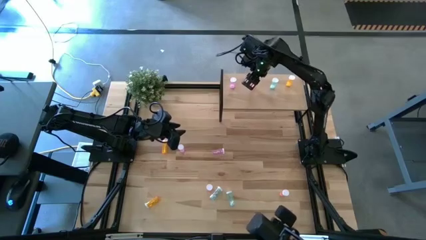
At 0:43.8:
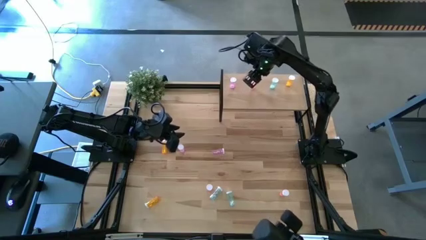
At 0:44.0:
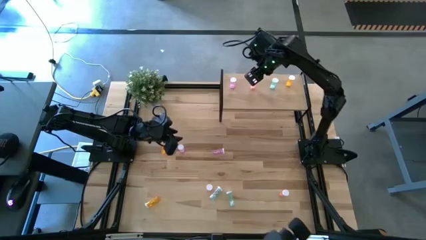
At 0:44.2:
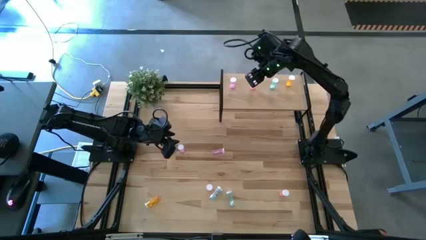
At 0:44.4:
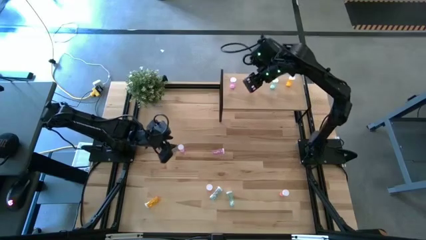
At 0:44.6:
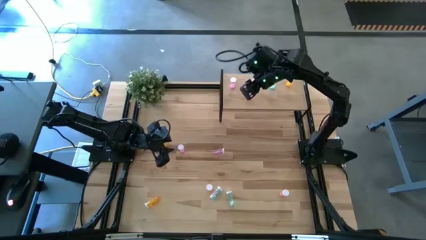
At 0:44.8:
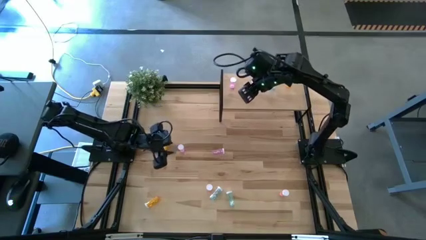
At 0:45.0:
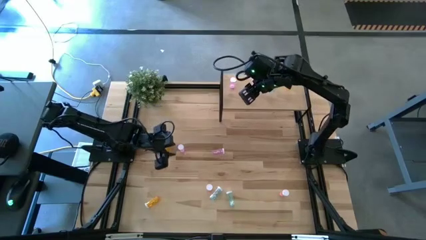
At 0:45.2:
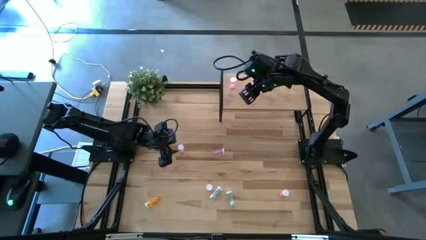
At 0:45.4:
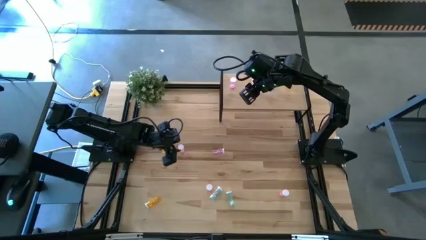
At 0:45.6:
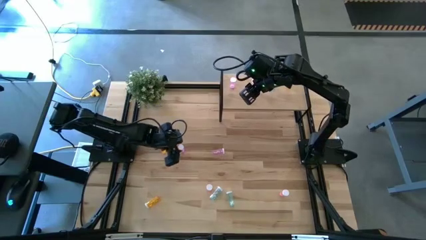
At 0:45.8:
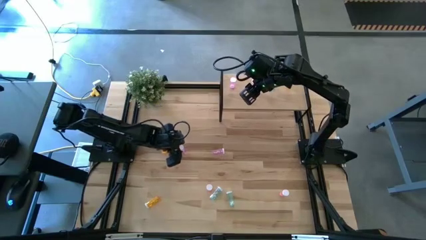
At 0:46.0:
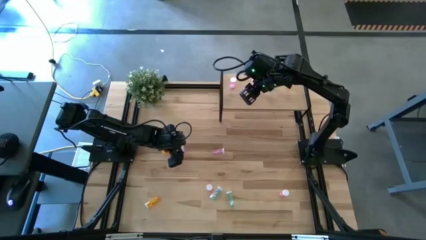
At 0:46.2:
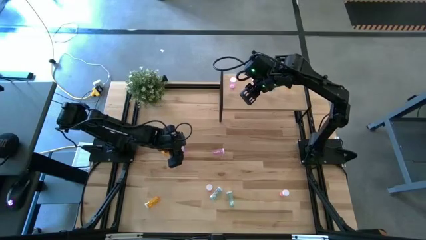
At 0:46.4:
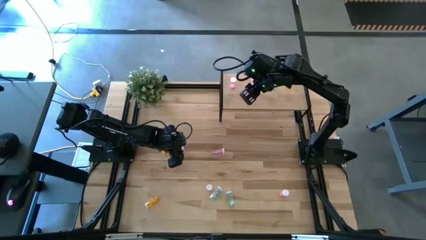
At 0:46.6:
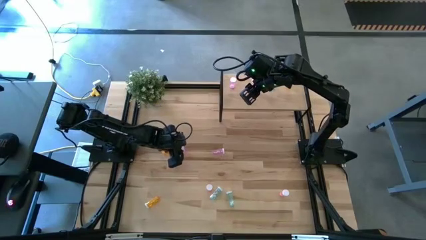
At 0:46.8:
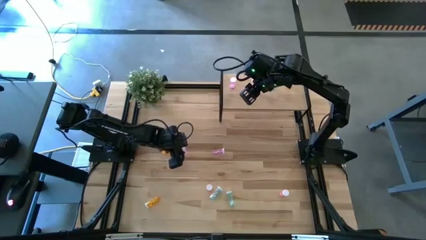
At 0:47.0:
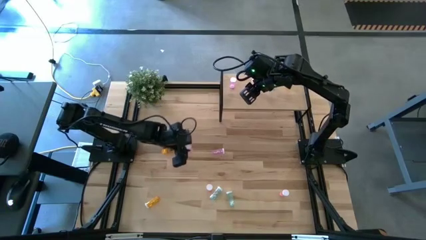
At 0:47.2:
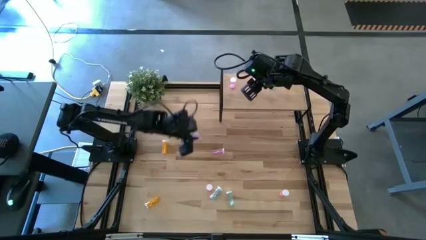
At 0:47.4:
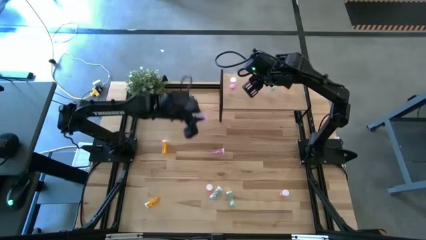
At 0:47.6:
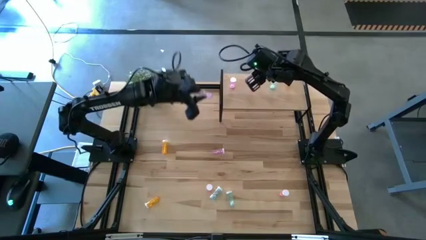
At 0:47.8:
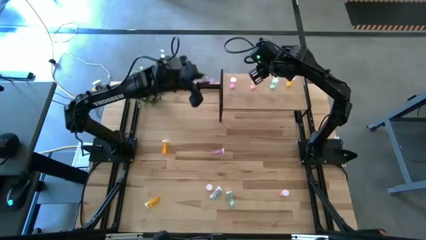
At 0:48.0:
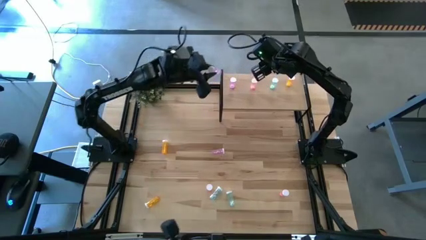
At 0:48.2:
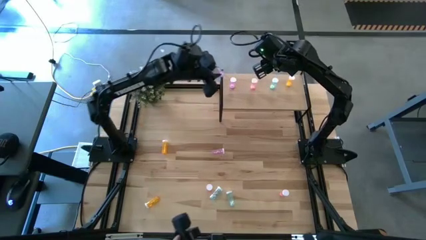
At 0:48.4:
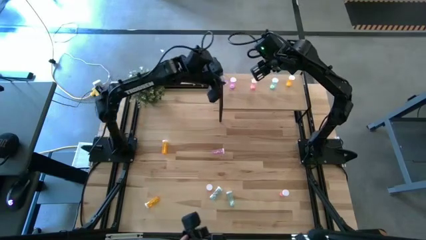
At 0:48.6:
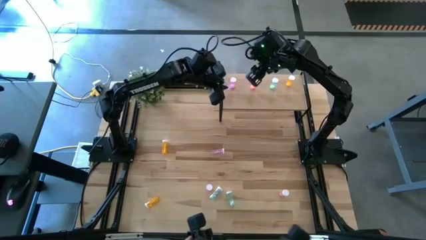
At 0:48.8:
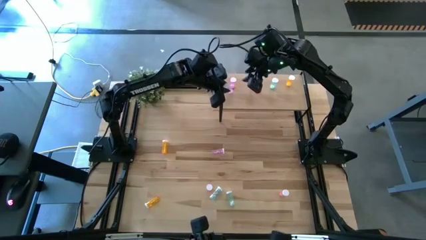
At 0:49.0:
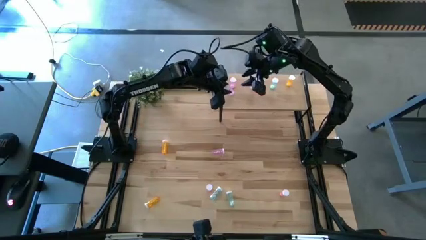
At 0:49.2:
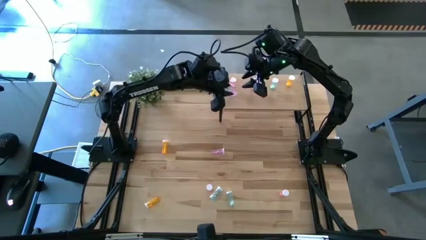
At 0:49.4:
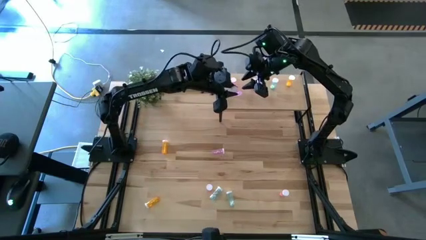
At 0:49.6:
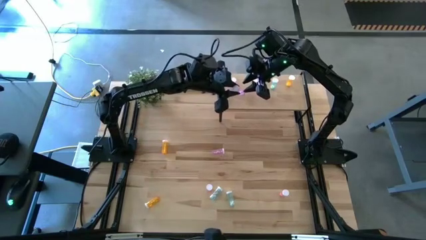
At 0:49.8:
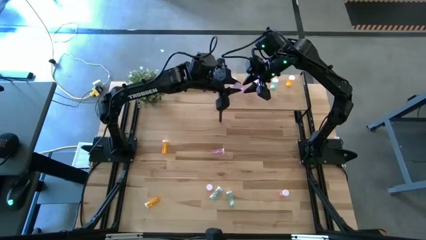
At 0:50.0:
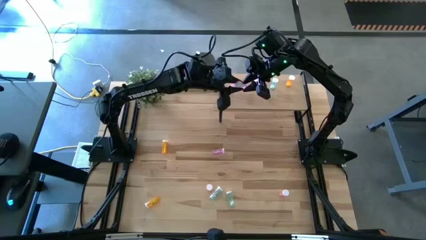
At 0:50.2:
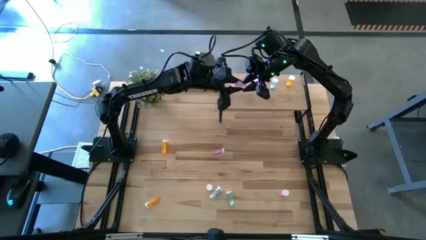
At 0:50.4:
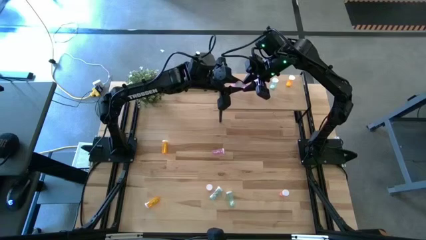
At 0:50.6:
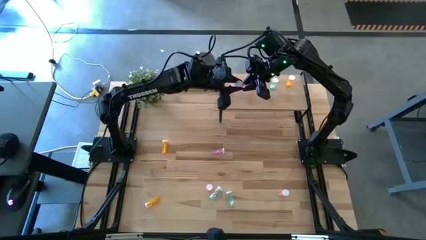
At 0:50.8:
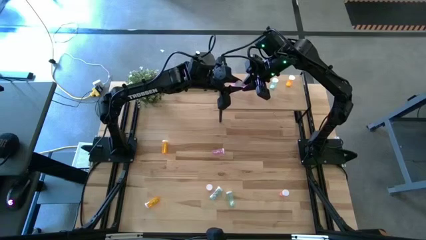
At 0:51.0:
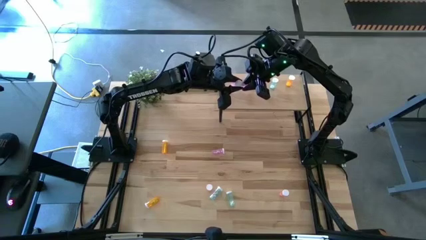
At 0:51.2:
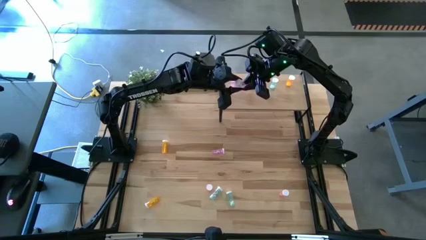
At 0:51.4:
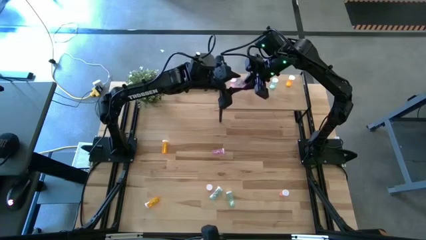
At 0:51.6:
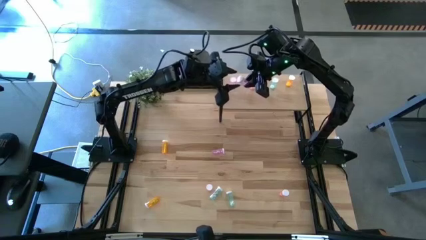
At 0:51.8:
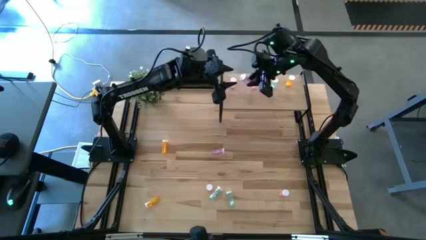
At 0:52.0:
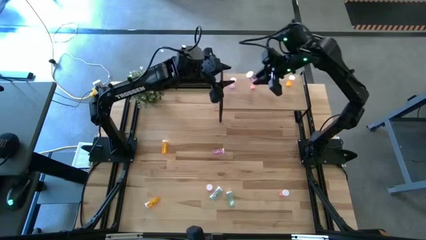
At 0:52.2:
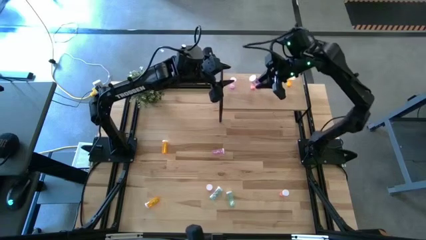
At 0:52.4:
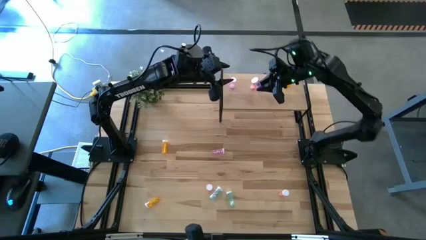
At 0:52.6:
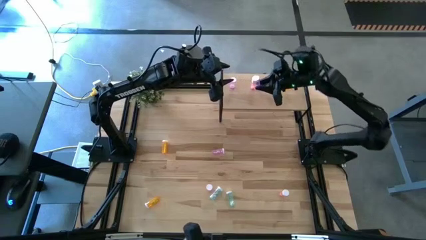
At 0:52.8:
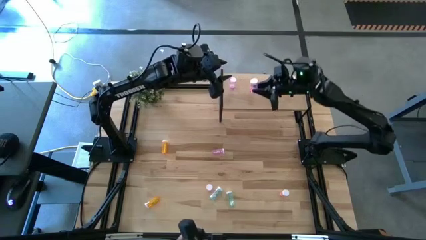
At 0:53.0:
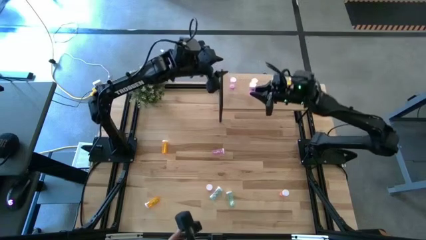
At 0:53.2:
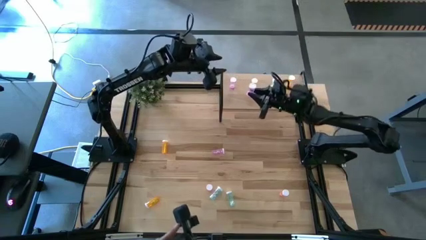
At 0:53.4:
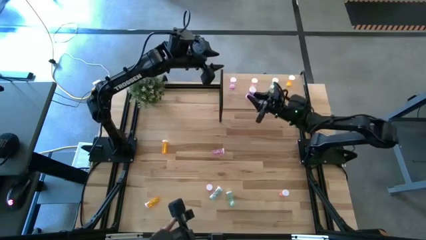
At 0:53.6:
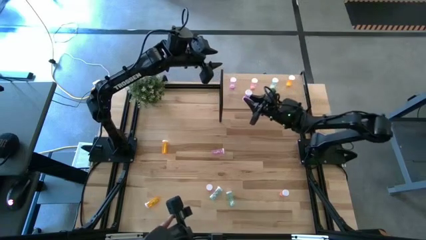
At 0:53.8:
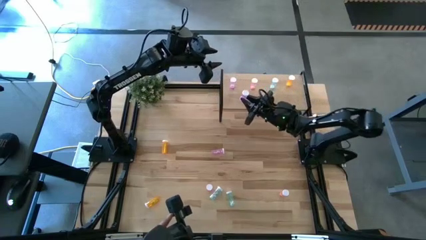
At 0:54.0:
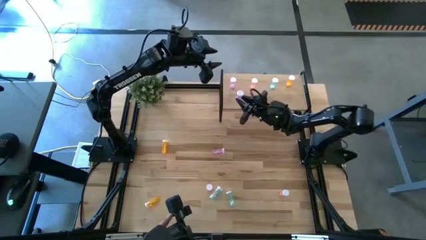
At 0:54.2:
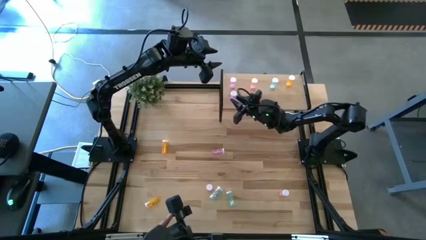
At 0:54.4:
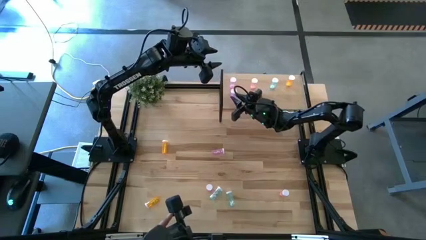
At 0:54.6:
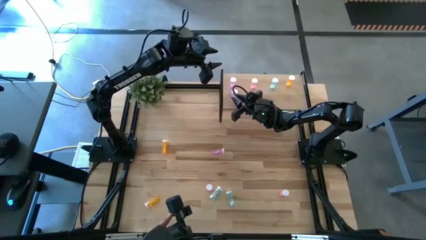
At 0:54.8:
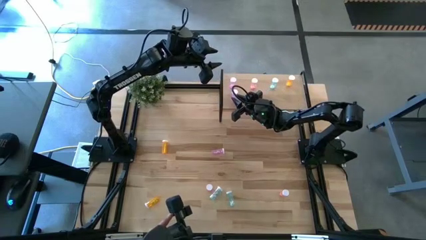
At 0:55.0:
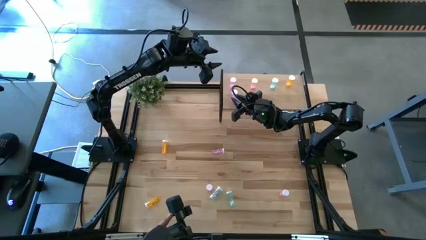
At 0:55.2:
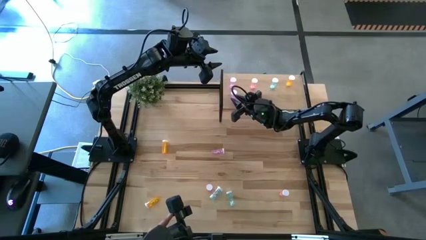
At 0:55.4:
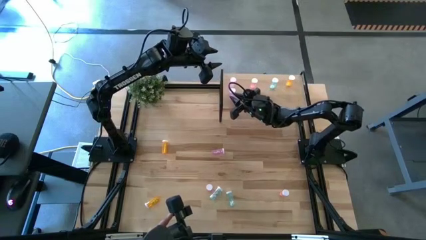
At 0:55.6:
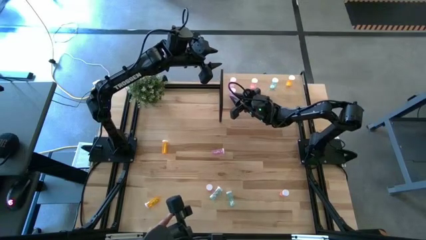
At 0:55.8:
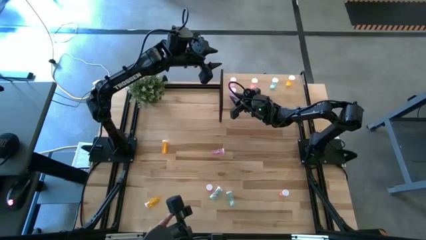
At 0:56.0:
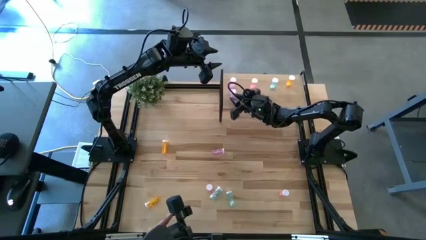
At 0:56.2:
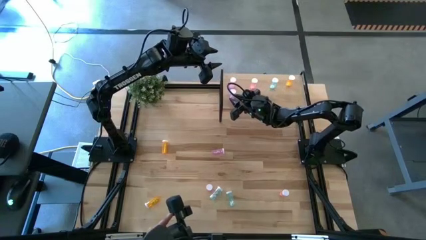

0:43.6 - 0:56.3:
Task: Pick and place medicine bottles onto shelf by color
Put the left pink pill bottle on the shelf aligned with the other pink pill bottle

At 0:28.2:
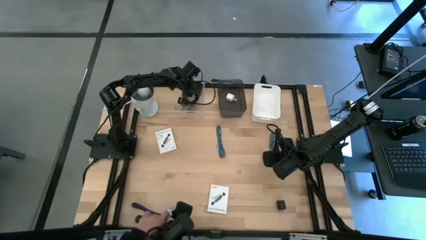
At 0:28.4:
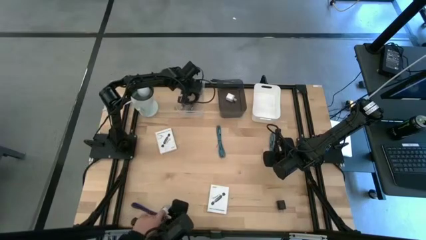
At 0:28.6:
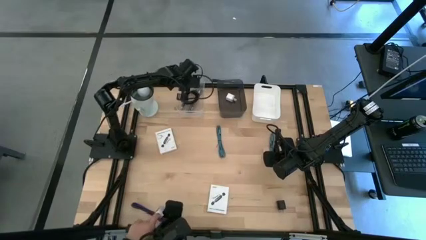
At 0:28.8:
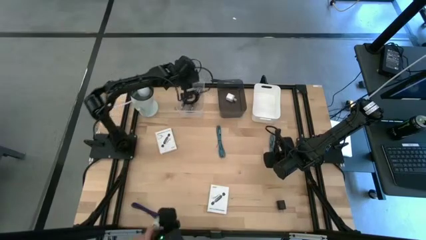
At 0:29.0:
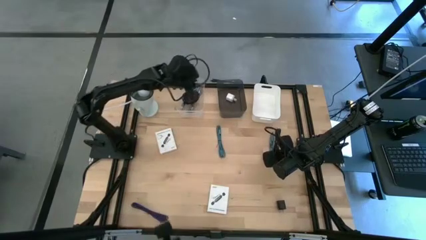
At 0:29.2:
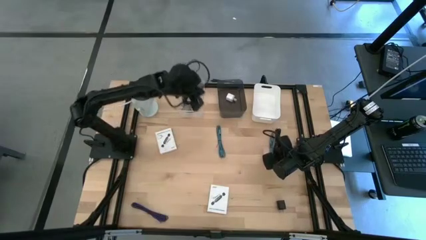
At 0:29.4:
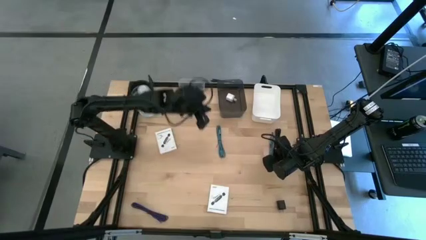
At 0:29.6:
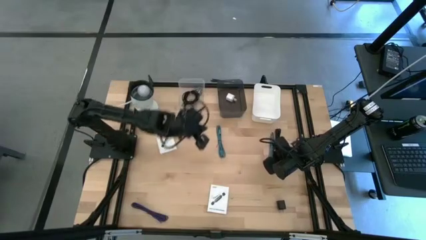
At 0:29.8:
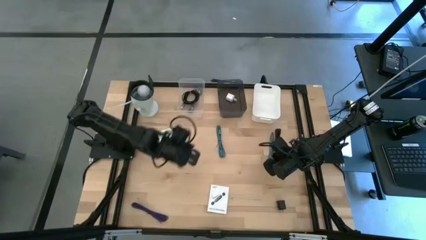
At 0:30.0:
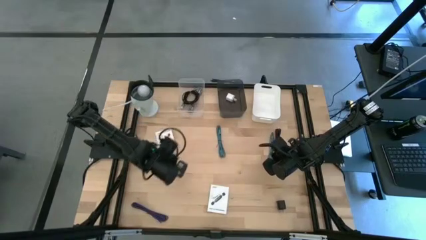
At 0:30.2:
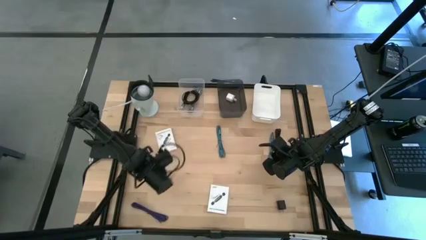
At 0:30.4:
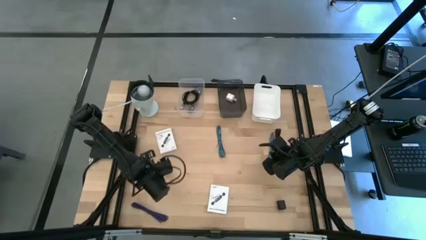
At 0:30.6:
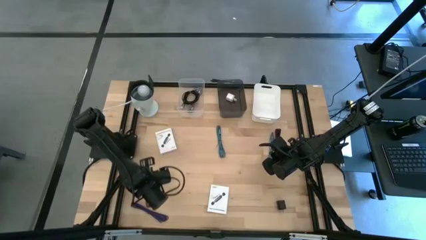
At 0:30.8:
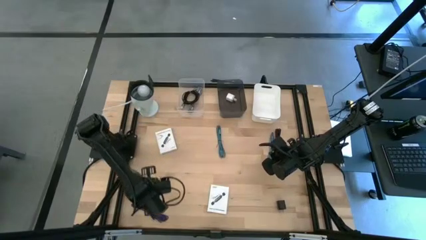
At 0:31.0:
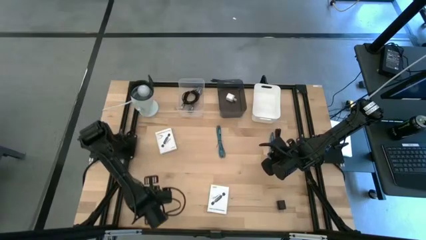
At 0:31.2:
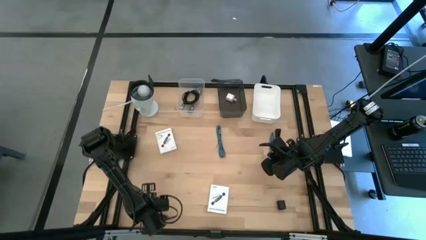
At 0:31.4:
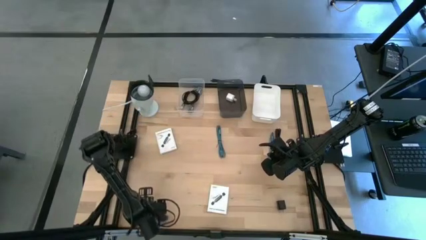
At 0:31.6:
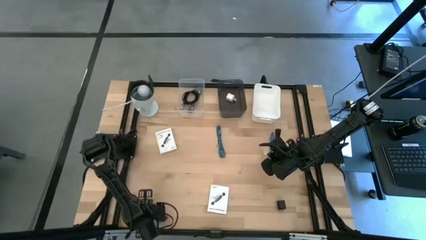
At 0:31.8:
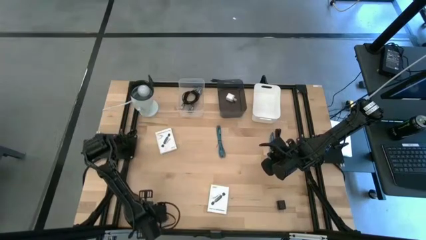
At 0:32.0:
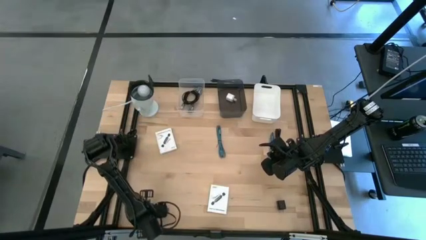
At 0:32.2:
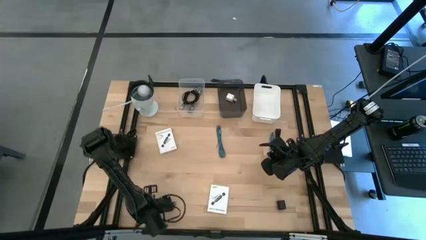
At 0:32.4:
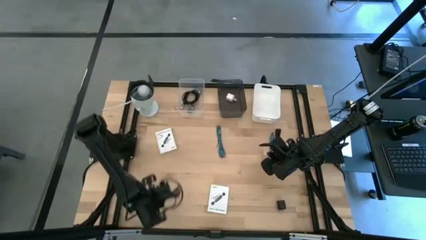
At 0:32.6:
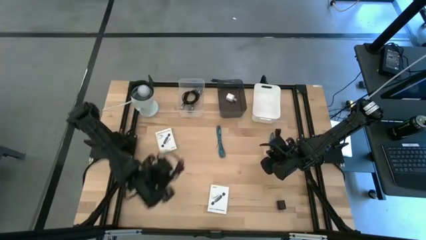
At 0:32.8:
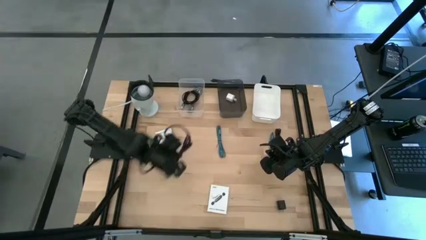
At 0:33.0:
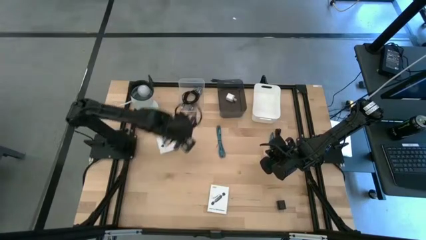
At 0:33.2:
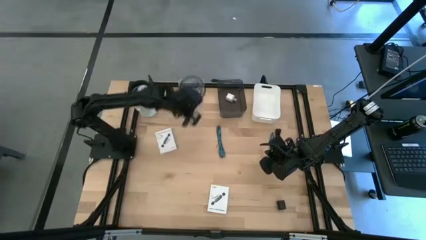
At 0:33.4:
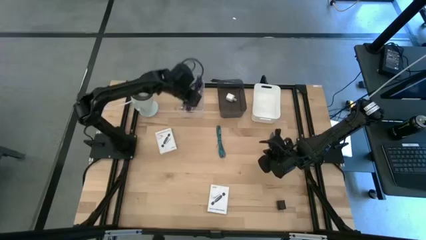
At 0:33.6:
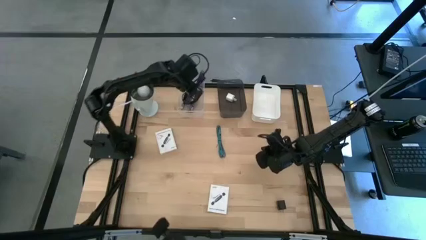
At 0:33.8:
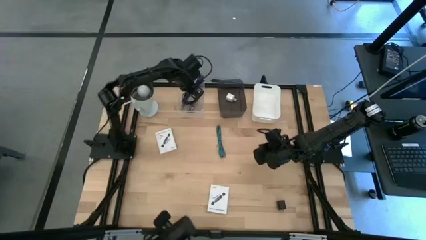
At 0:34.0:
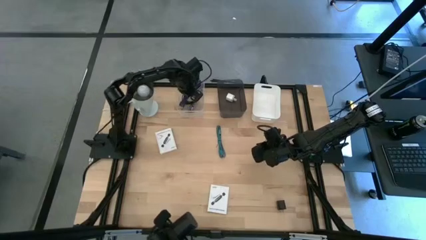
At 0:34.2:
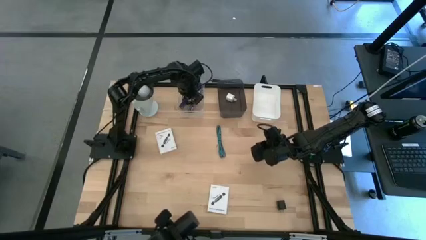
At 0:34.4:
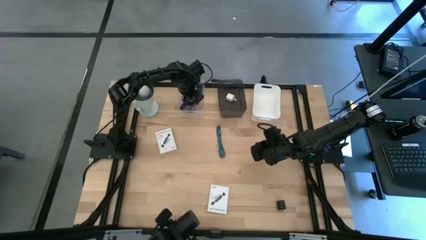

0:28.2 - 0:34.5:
Task: Pick and place items into bin
Put the blue charger cable into the transparent bin
